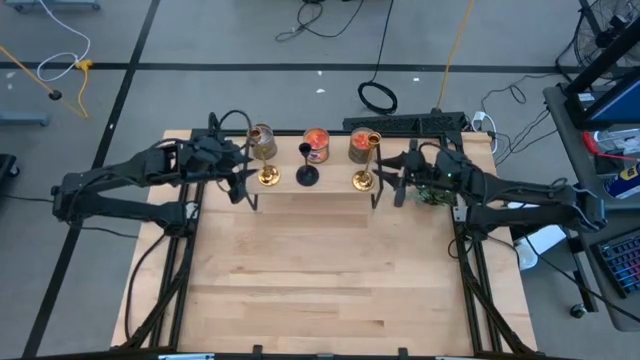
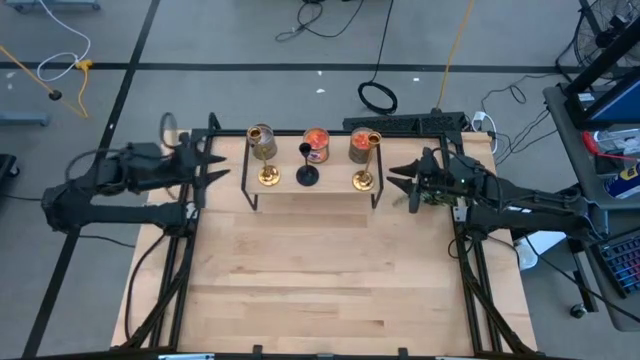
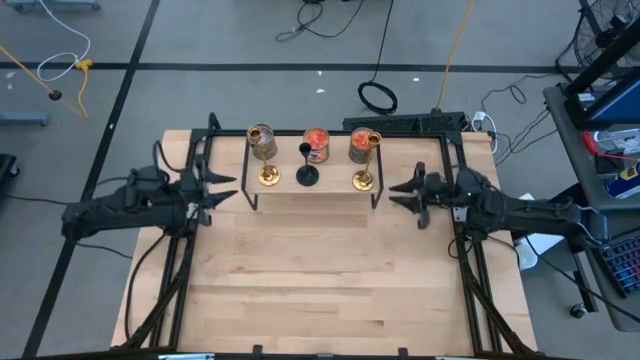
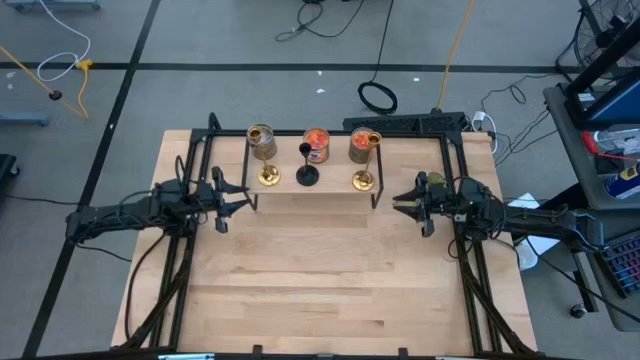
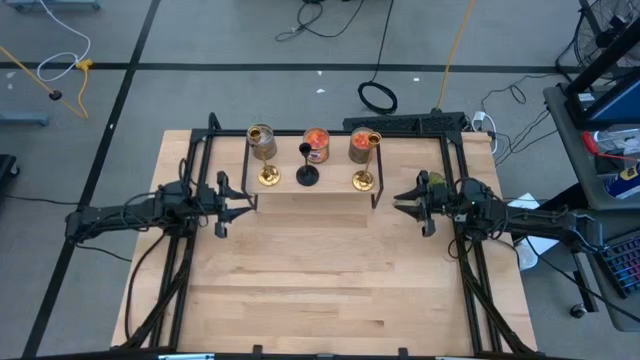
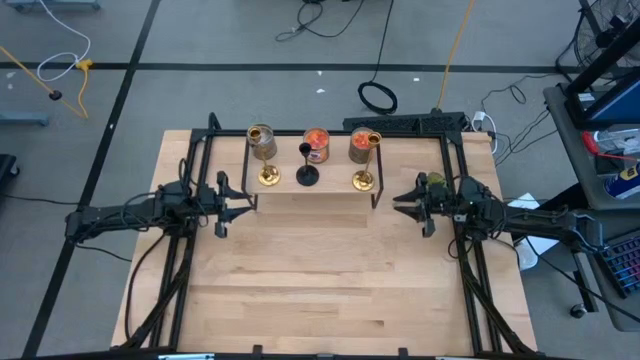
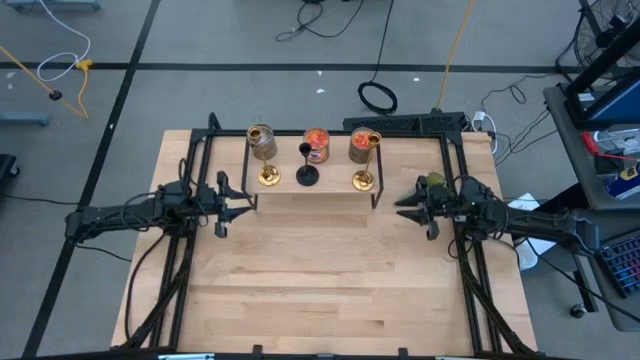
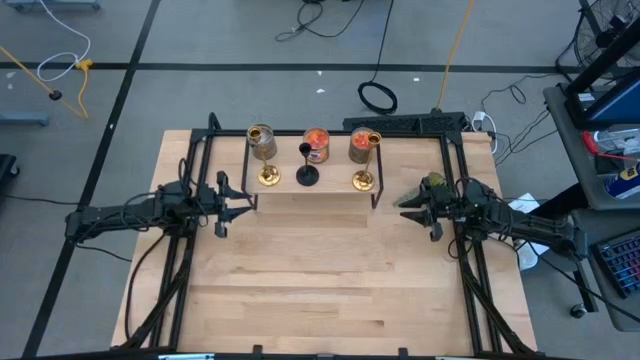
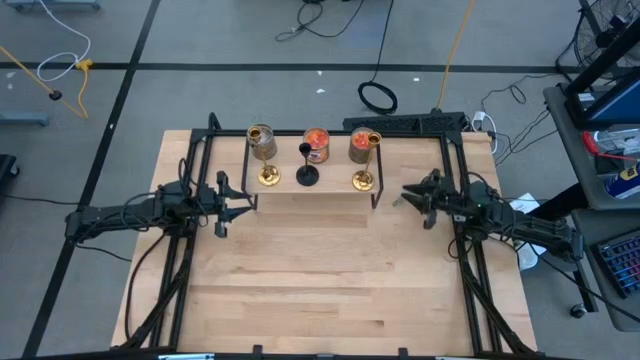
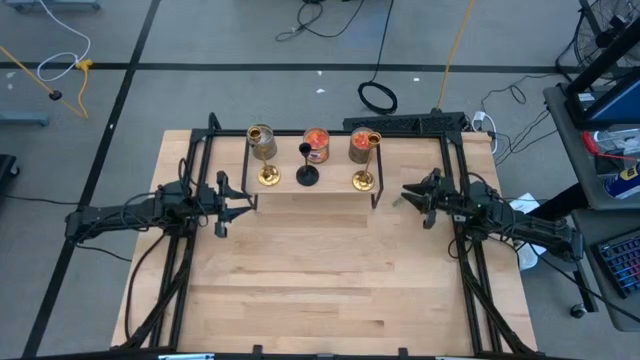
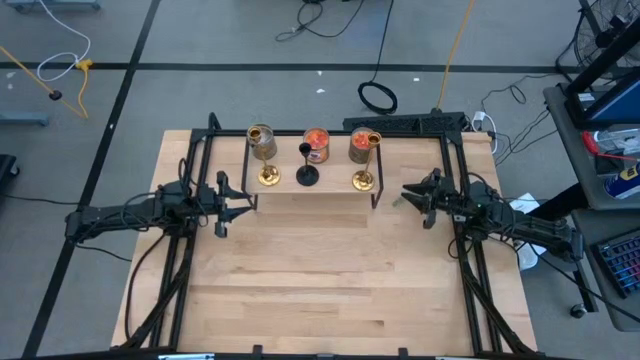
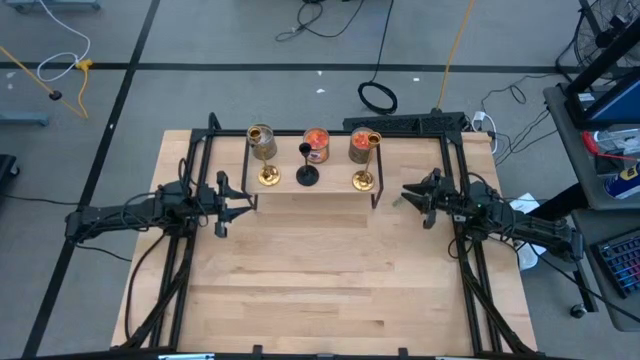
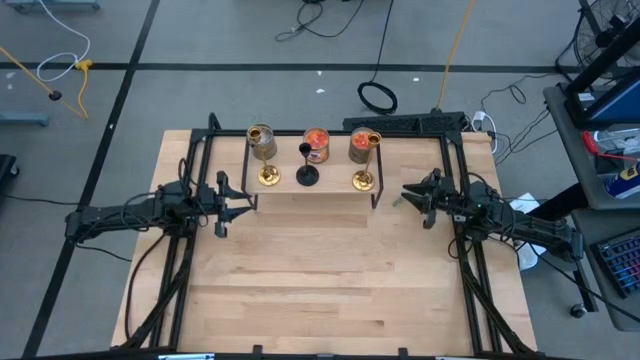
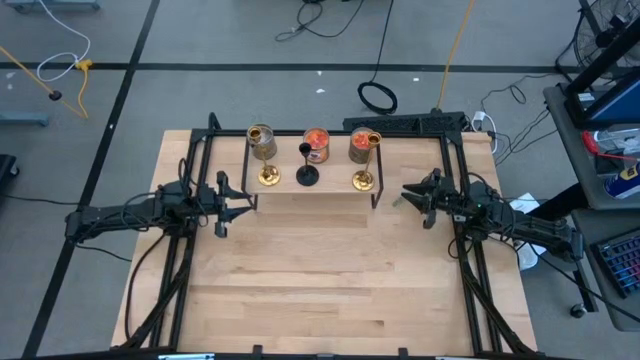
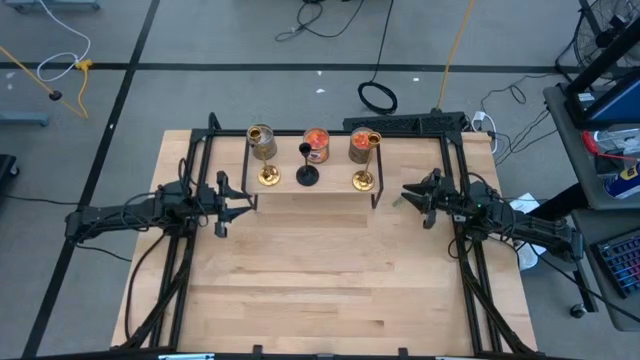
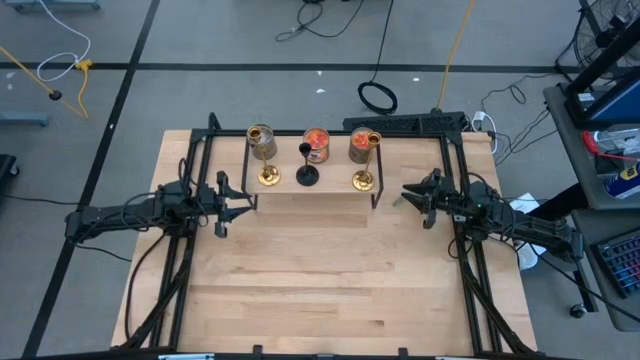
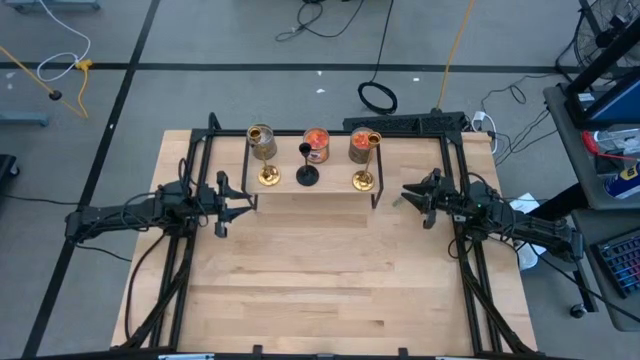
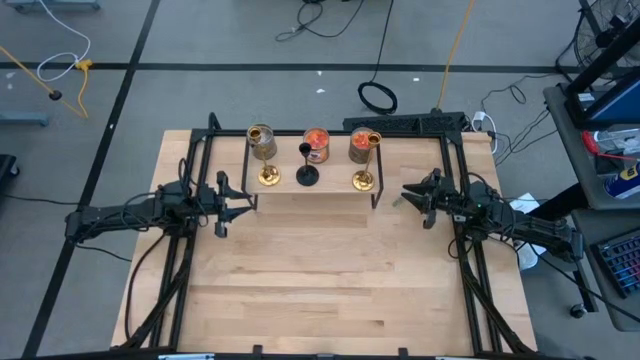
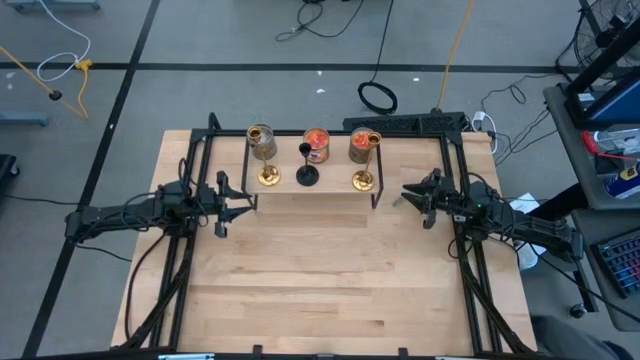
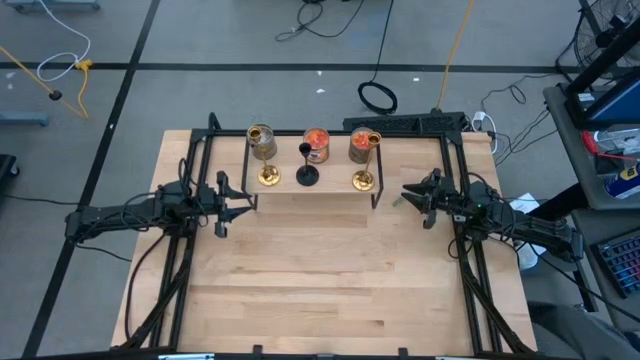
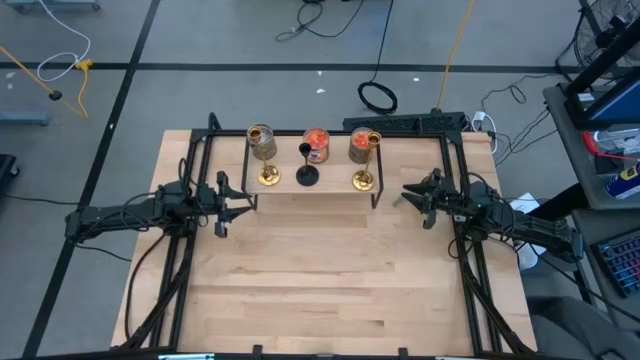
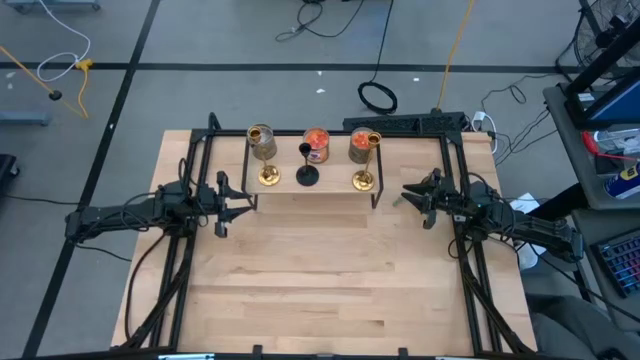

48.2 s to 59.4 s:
Task: Pick & Place candle stick holders
Return to Home Position

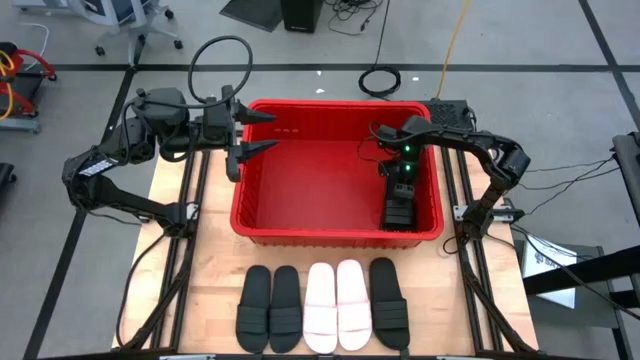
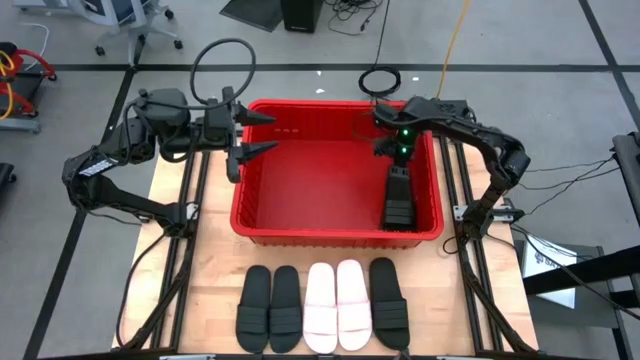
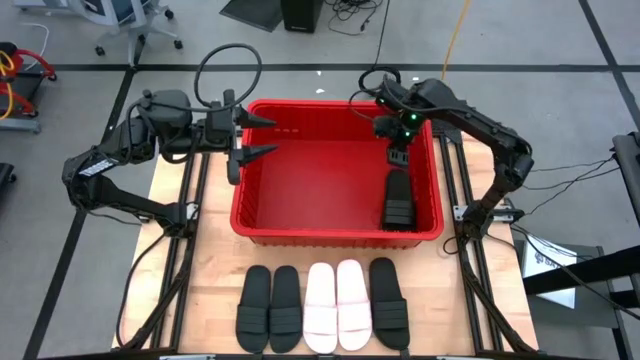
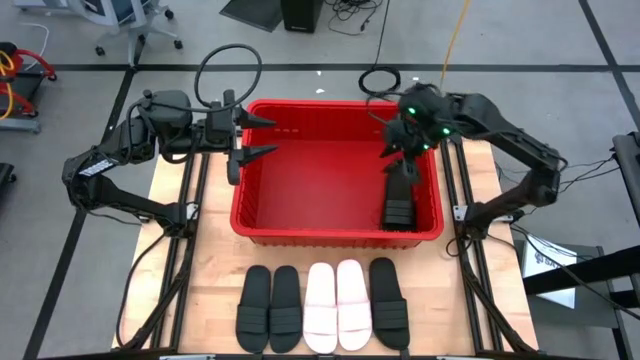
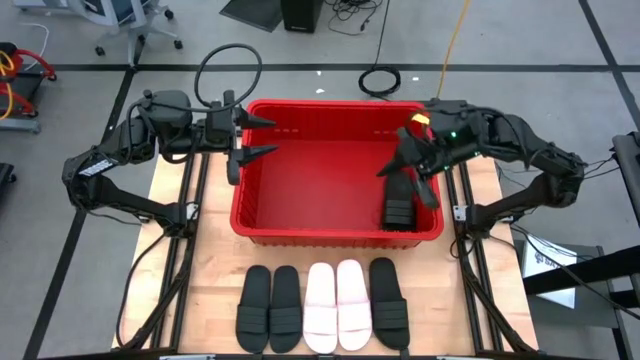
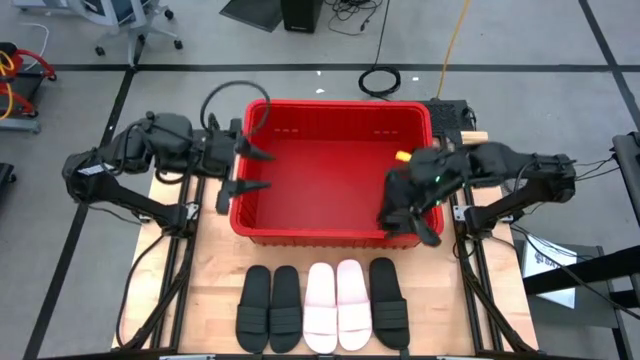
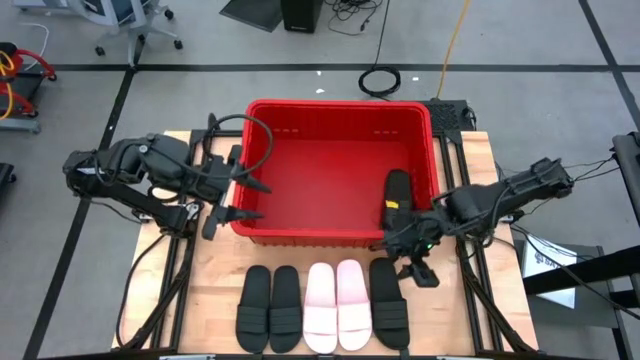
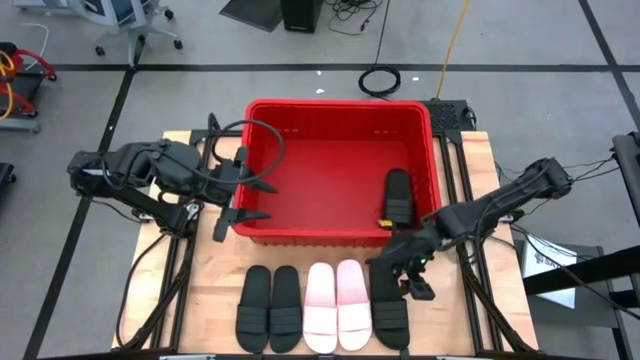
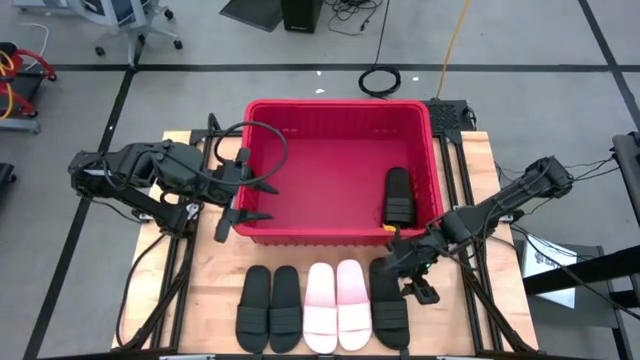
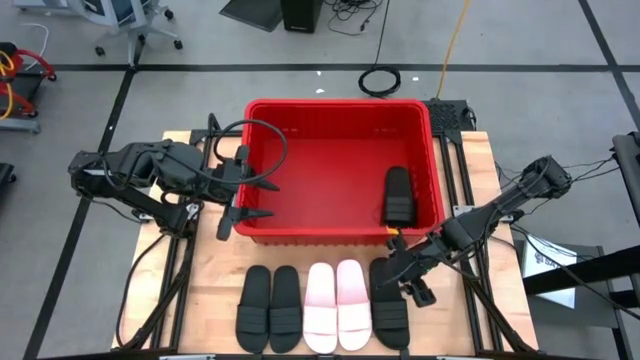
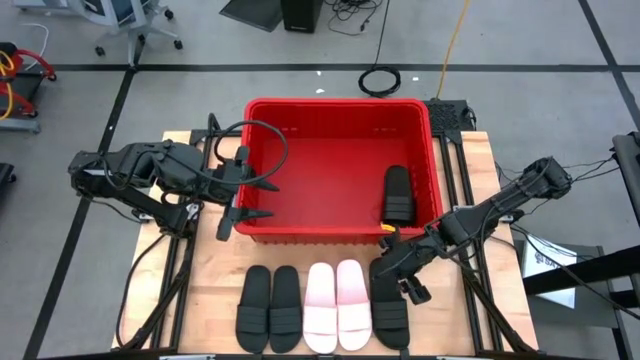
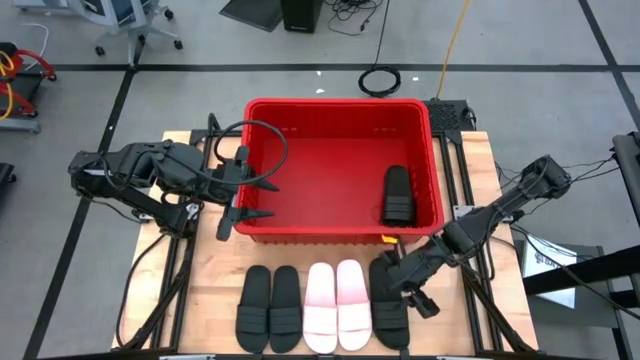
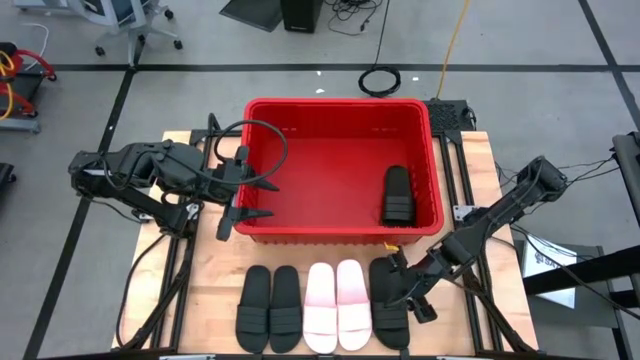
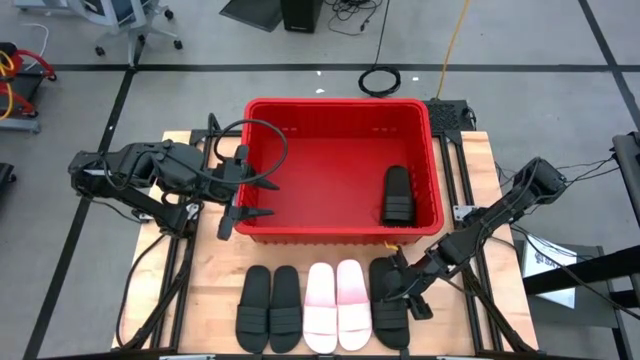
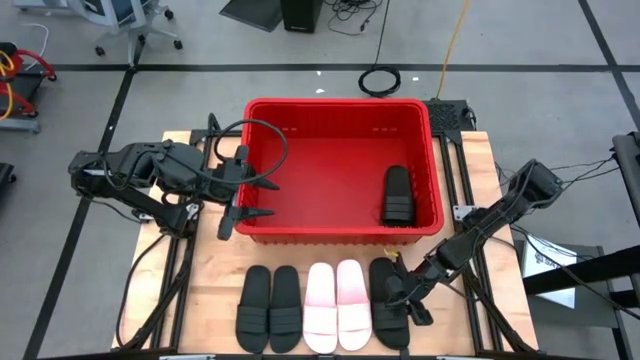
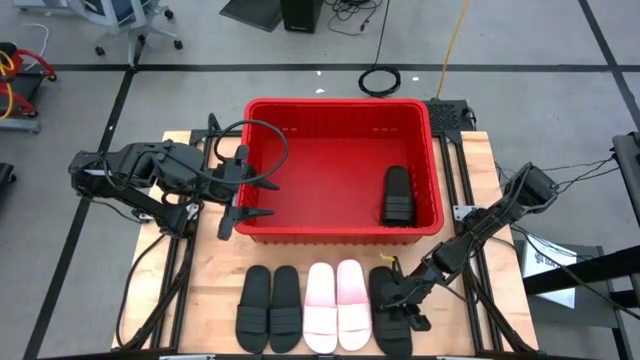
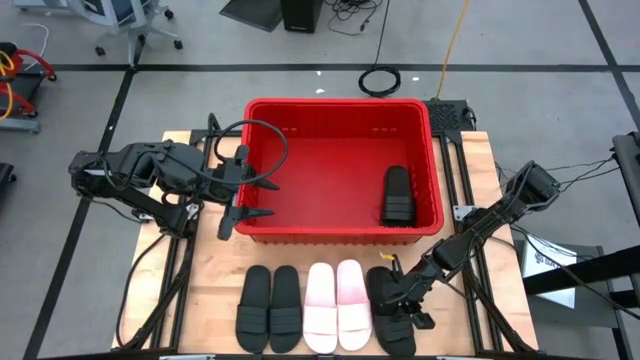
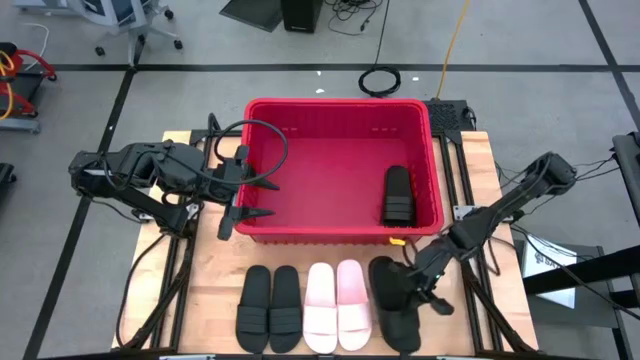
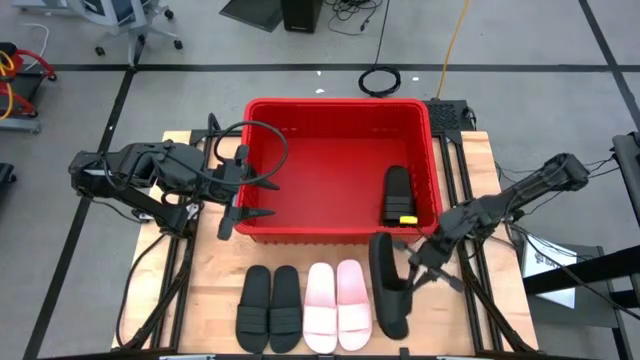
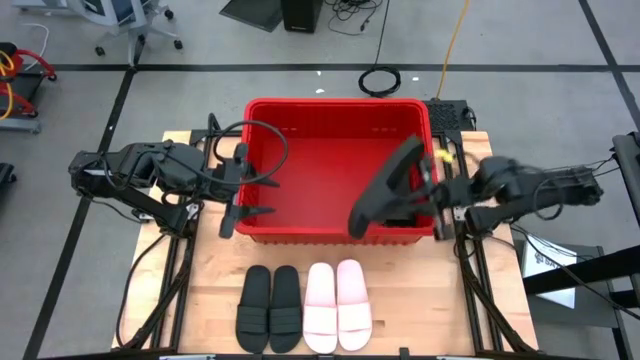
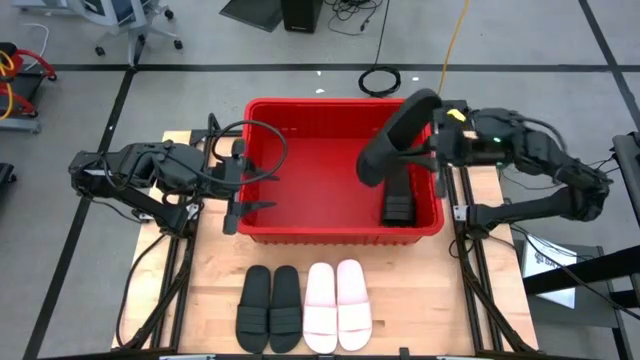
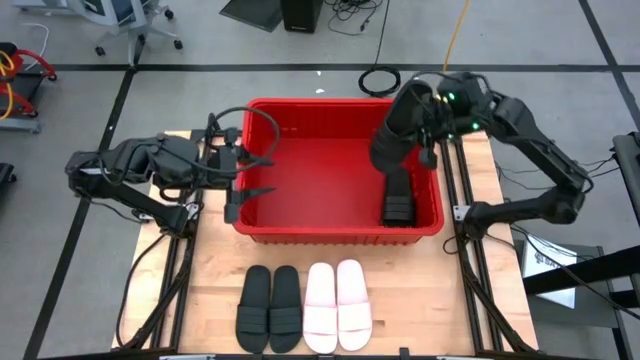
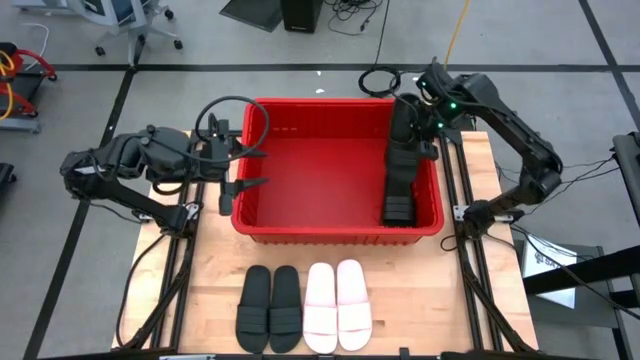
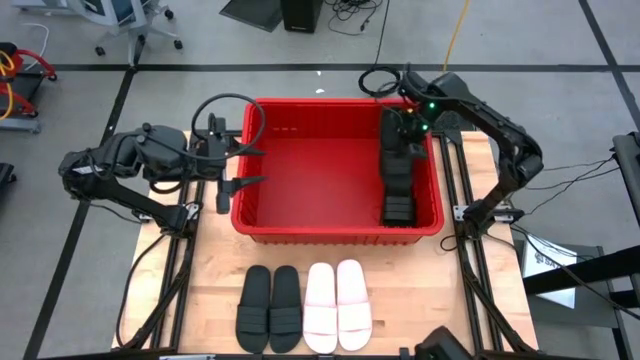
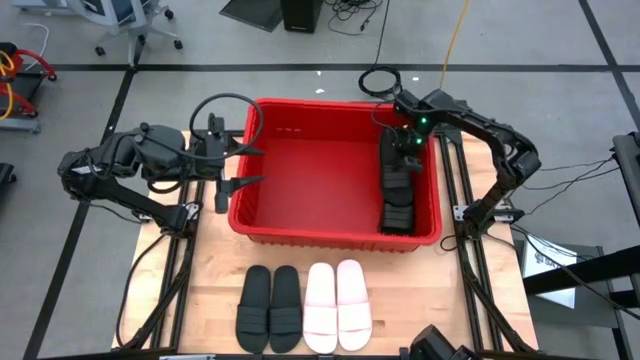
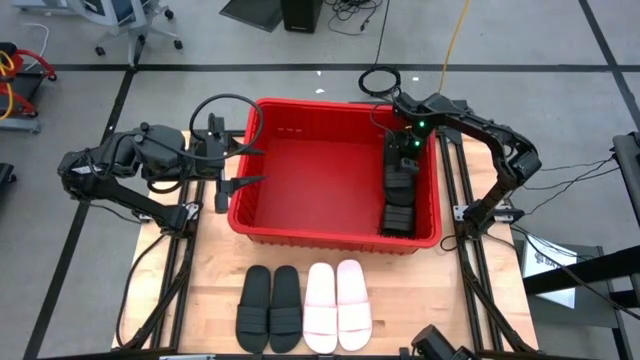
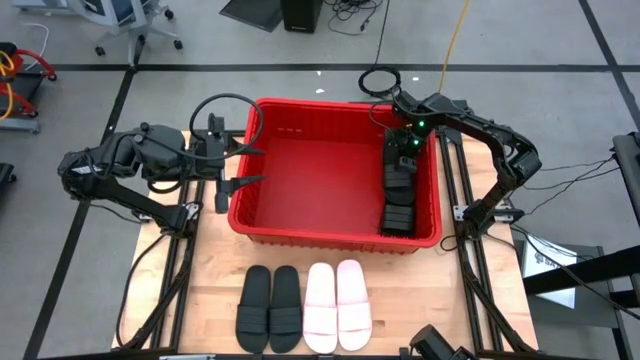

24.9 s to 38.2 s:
Task: Pick and place slides into bin
Put the black slide into the red bin
